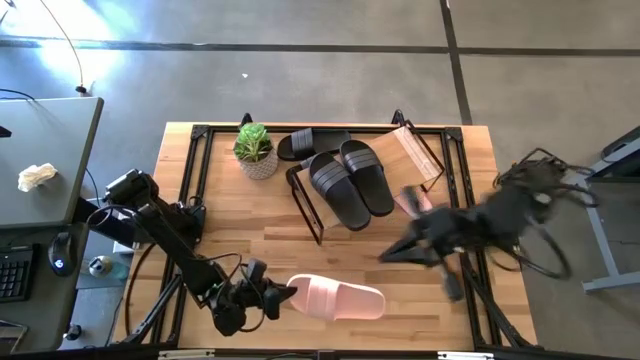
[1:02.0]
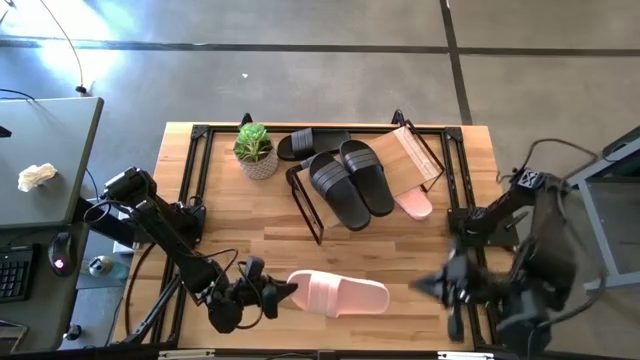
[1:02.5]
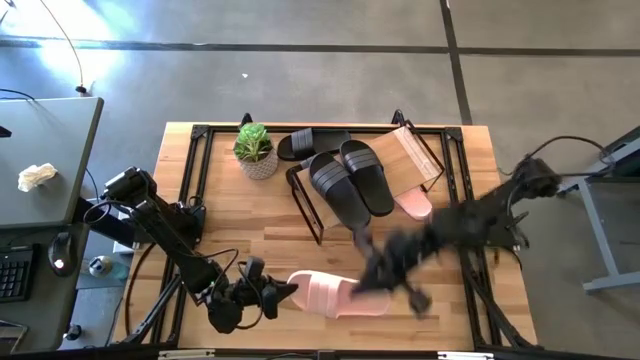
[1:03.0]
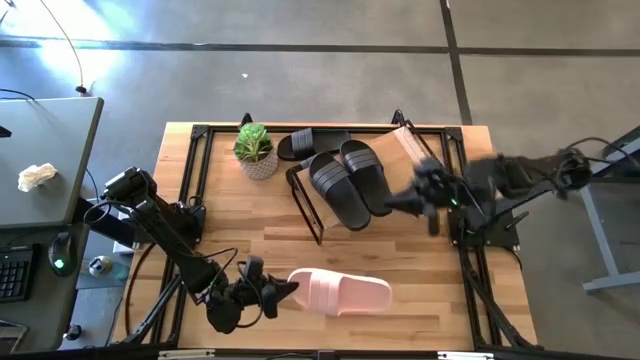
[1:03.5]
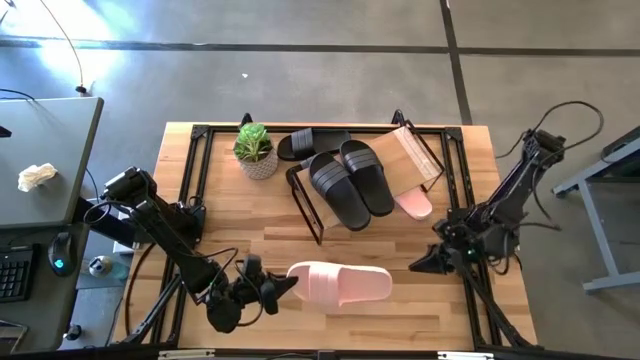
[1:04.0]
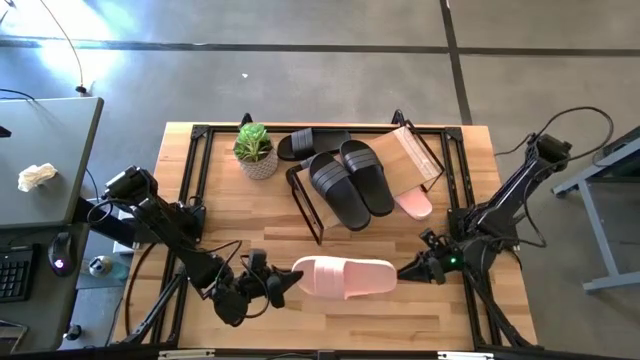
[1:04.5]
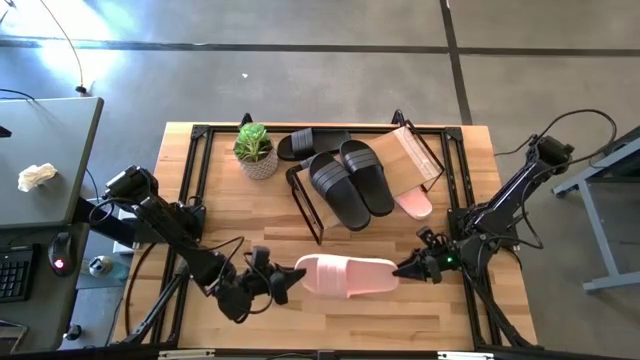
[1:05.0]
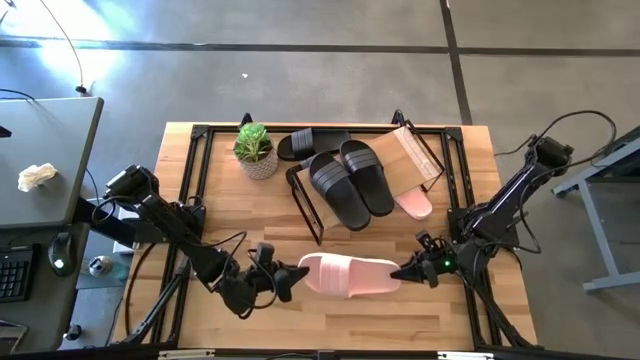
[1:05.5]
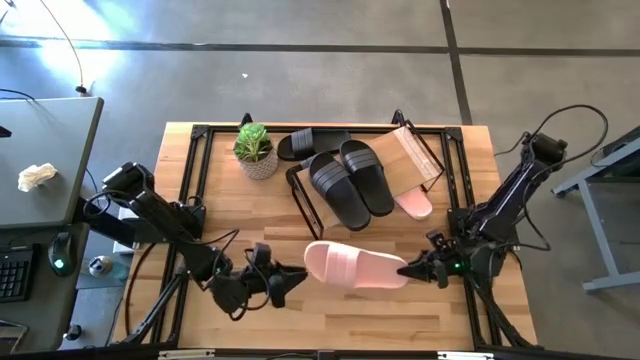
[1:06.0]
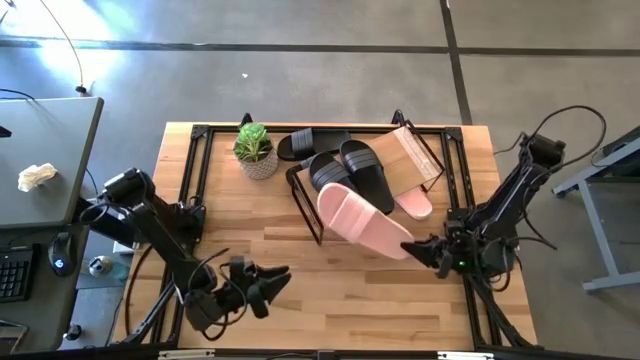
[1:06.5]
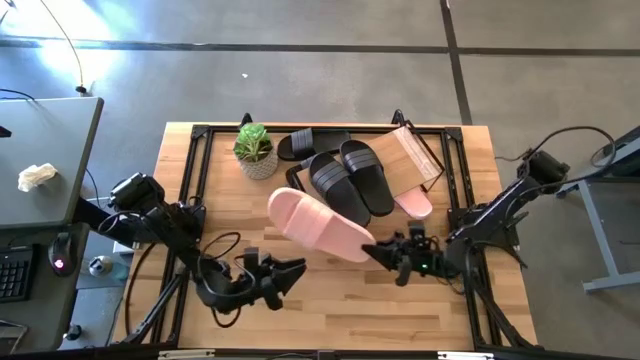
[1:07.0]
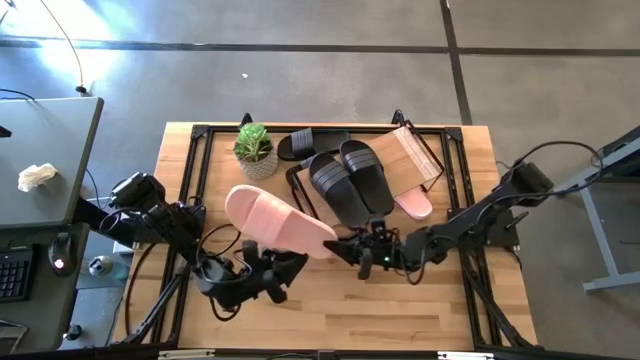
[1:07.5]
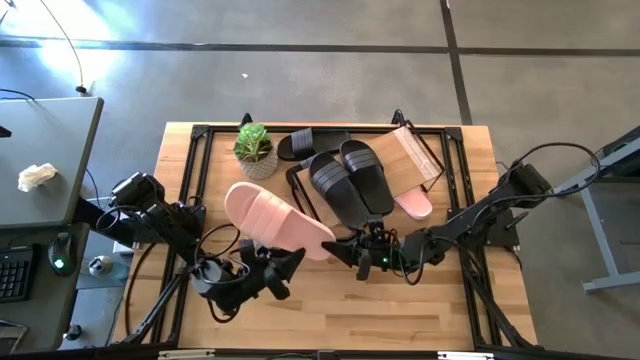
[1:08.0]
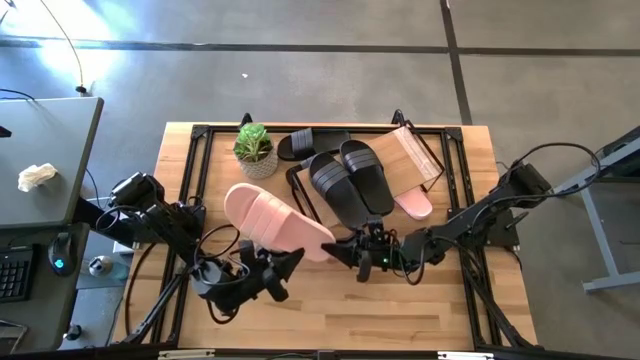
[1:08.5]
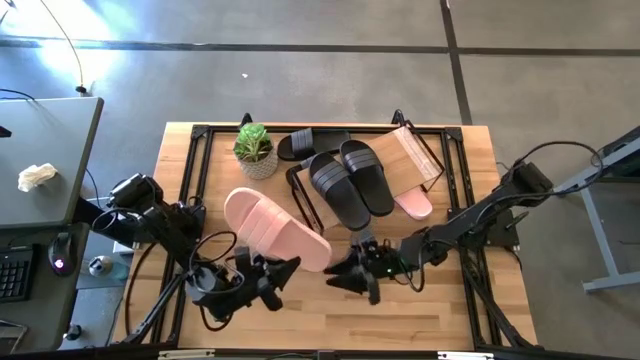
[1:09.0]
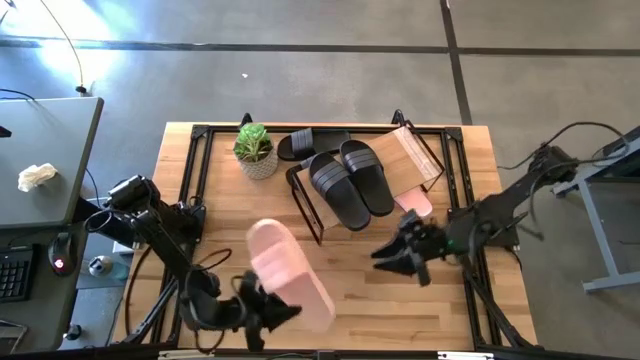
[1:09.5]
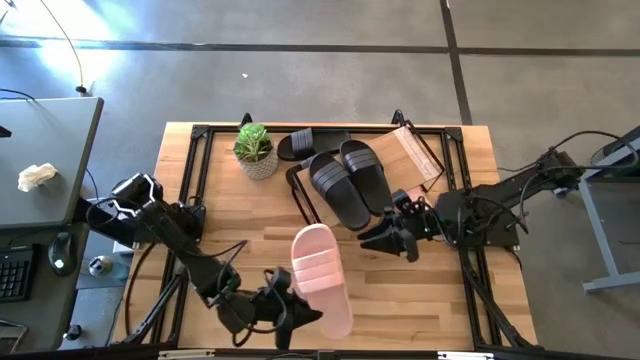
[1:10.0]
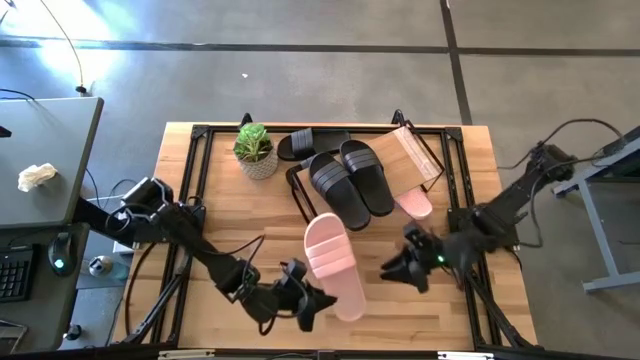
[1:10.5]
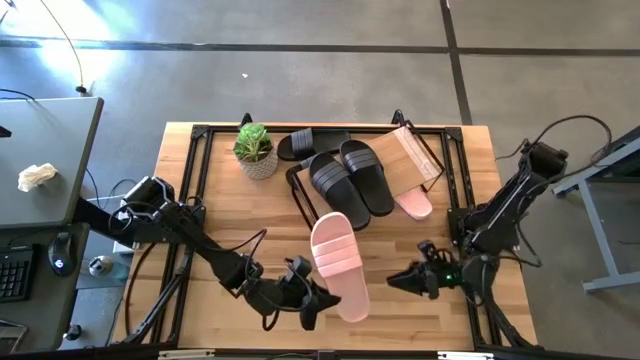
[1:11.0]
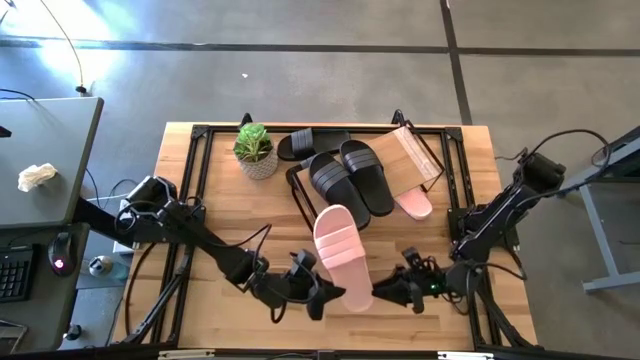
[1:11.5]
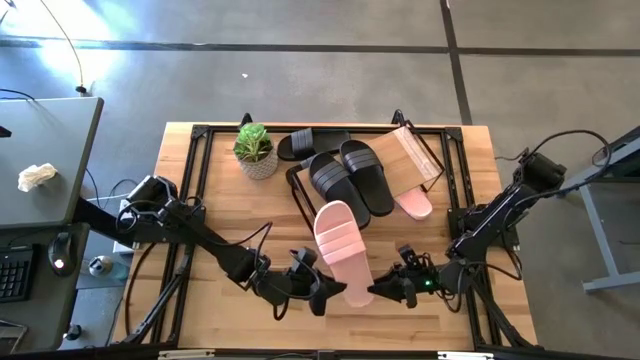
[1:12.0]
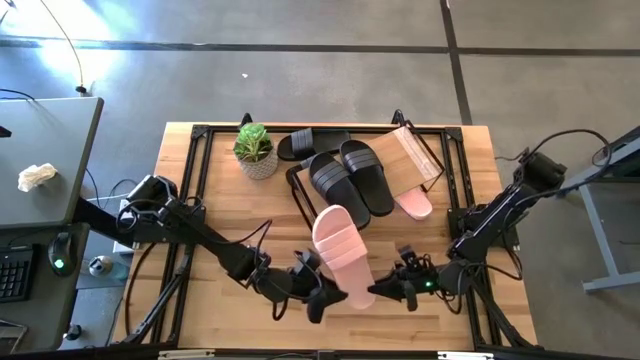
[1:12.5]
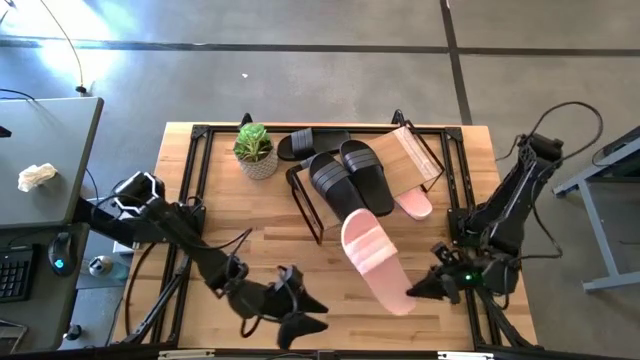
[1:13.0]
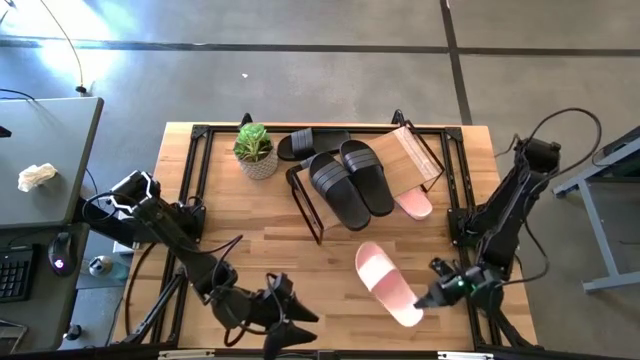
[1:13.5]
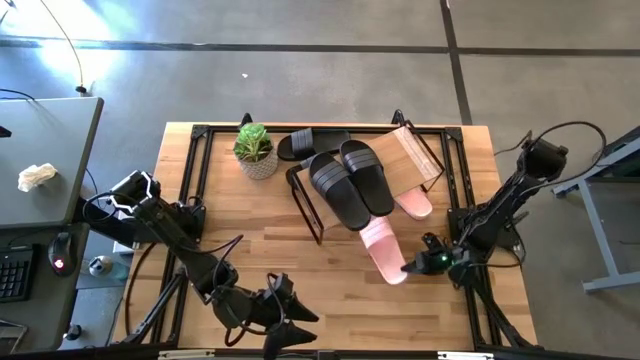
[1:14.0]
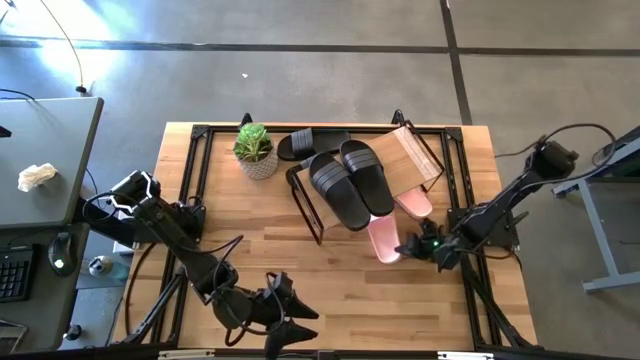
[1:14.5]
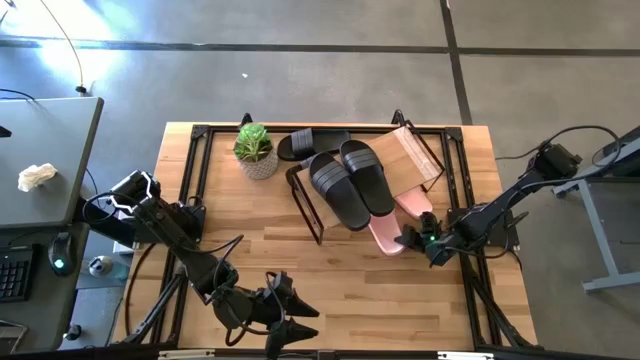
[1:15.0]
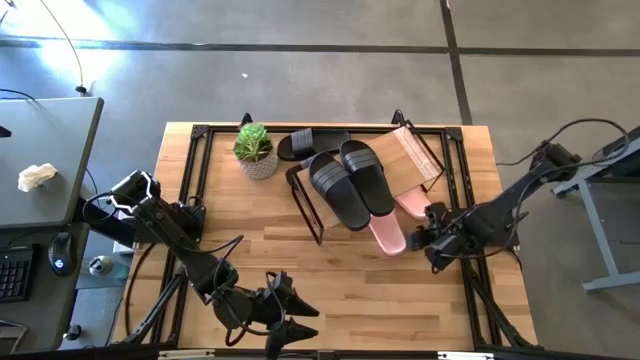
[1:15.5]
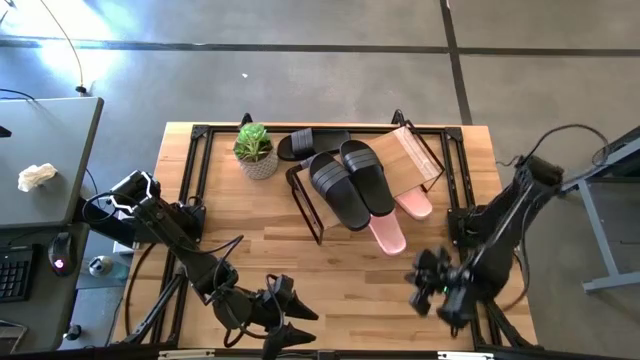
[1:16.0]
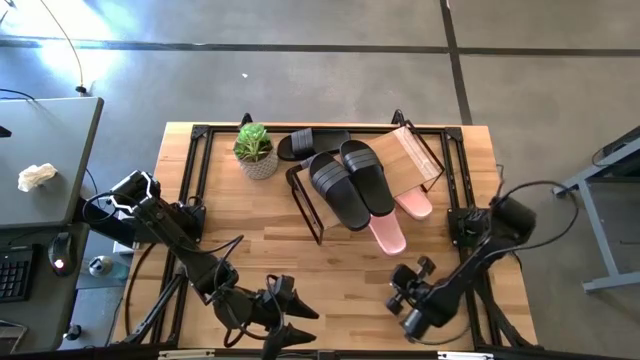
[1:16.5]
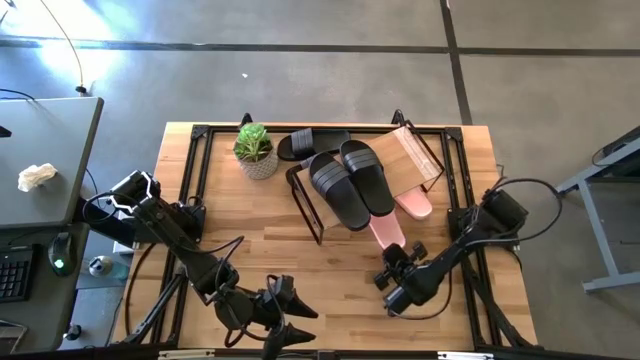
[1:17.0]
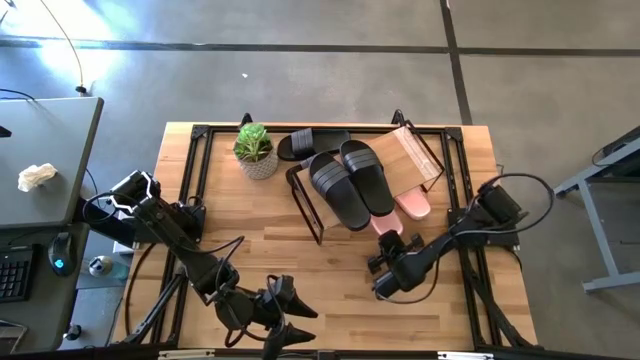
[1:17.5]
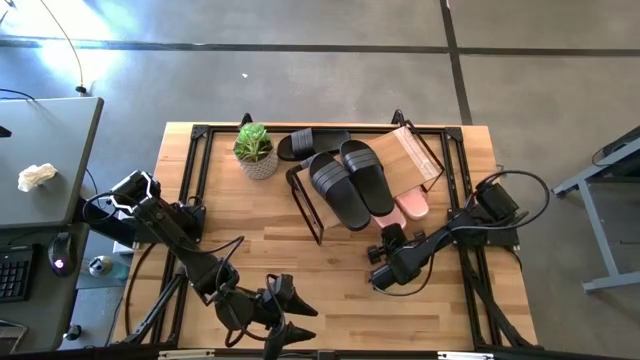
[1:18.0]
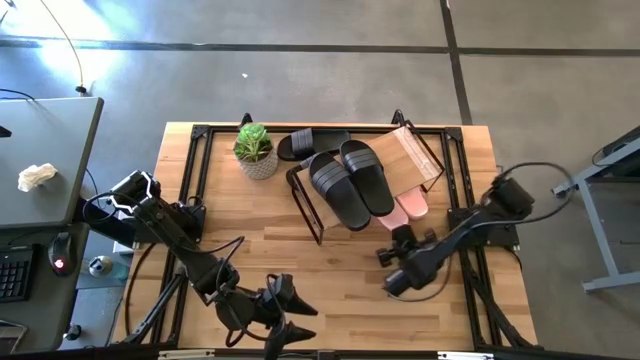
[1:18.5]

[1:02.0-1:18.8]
Task: Pick and place slides into the shelf
Put the pink slipper under the shelf

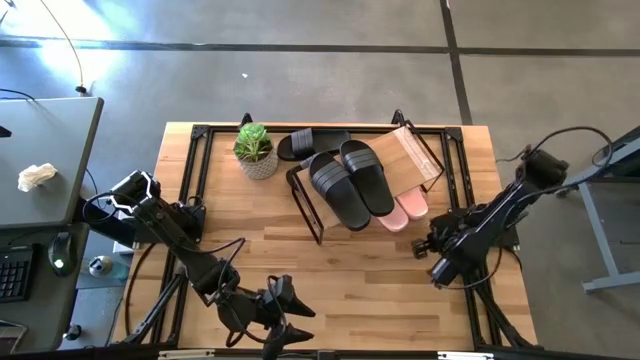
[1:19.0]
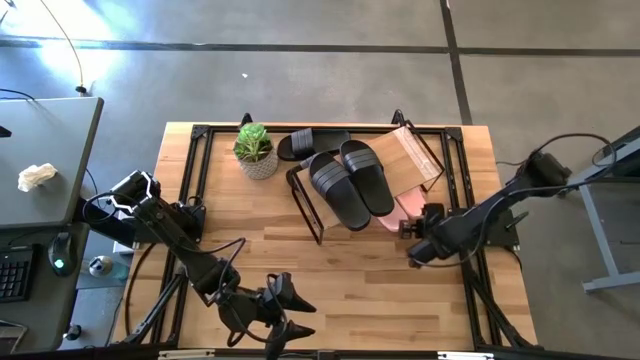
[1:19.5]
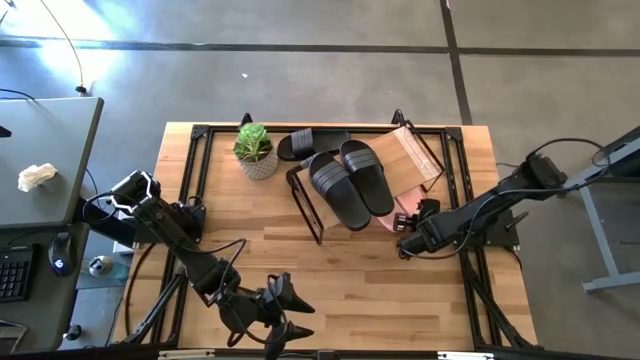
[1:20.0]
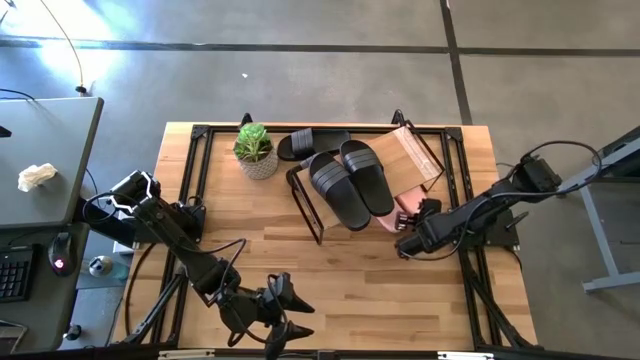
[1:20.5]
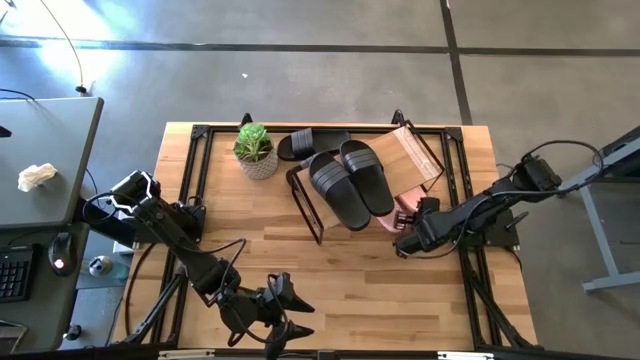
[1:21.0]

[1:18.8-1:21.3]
Adjust the right bottom pink slipper

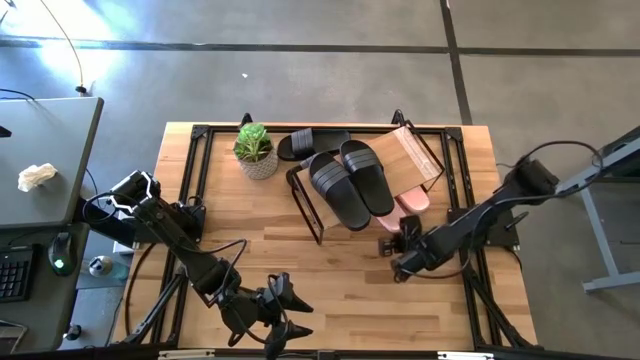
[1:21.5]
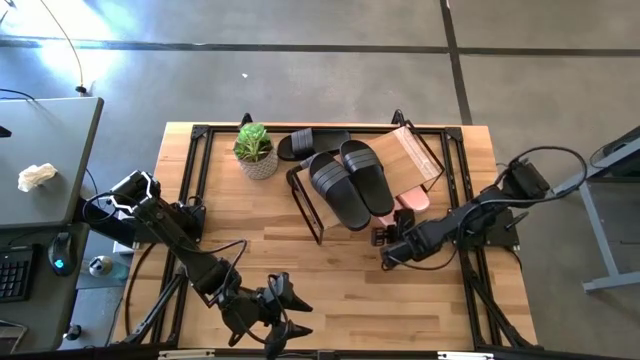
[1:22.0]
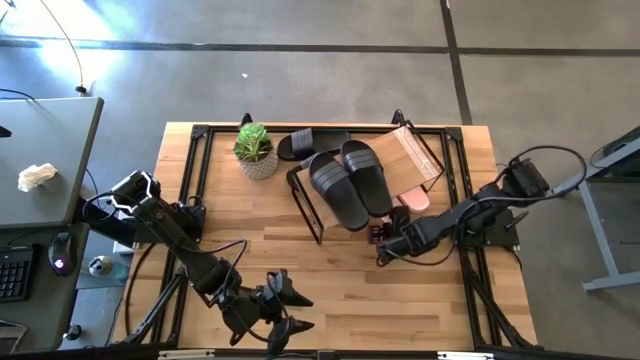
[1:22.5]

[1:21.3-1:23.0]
Adjust the left pink slipper
